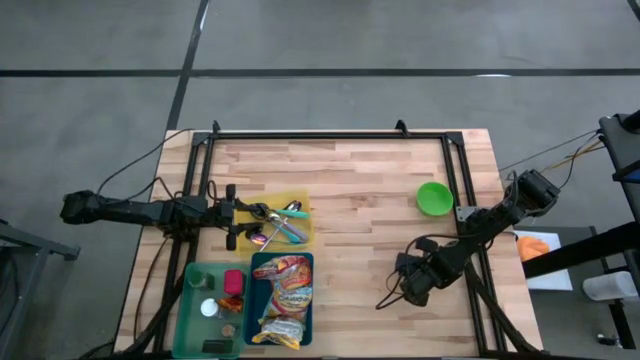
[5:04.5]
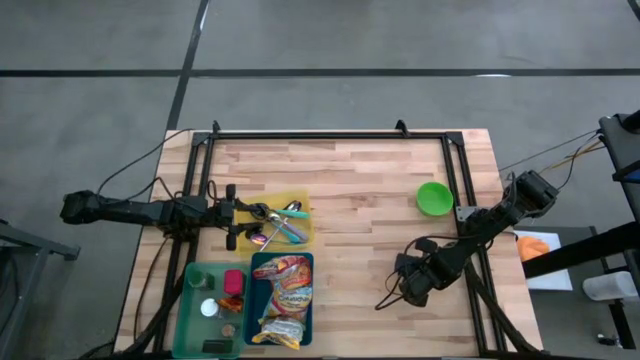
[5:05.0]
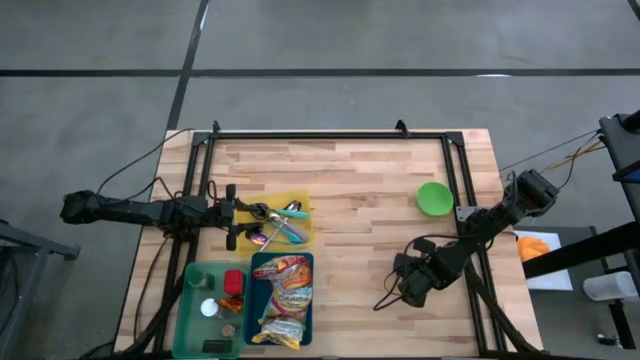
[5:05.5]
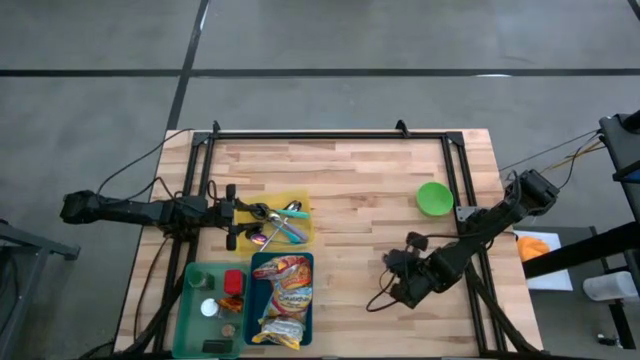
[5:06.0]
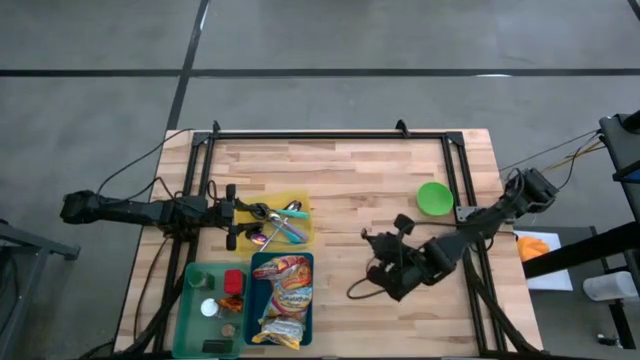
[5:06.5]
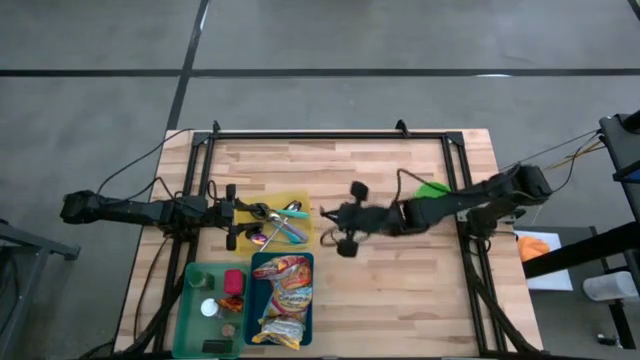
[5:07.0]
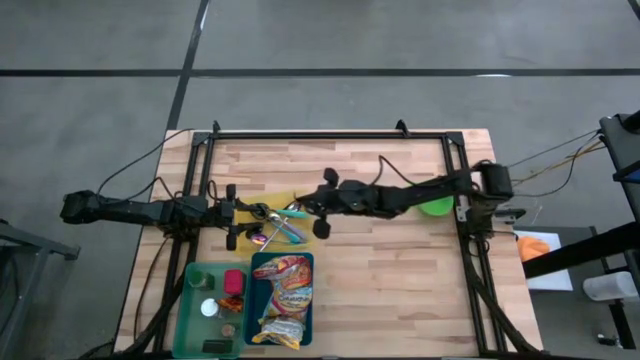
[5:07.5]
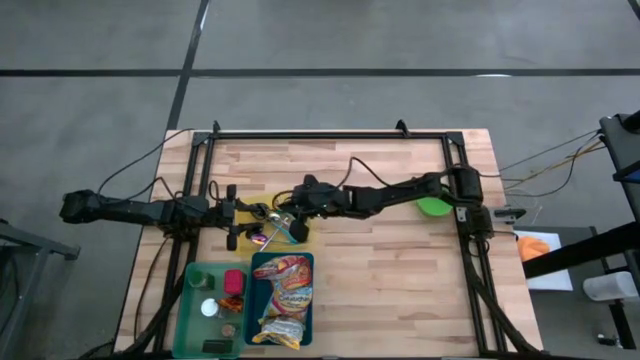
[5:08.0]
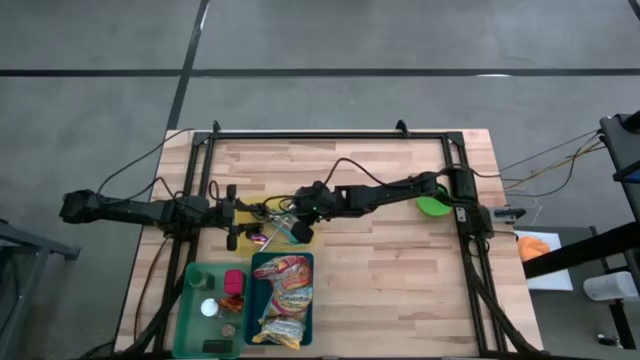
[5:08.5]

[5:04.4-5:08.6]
Put the light blue spoon into the yellow bin

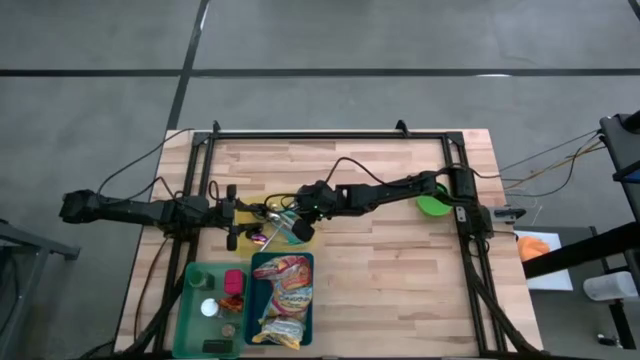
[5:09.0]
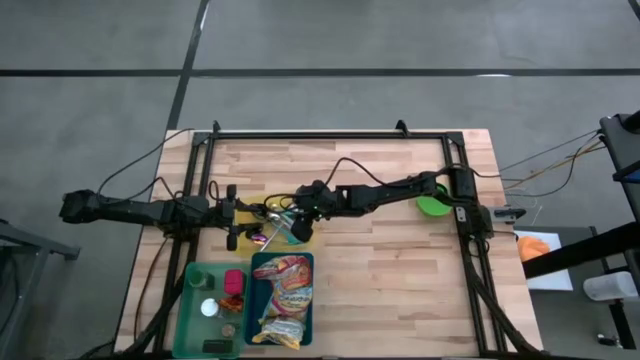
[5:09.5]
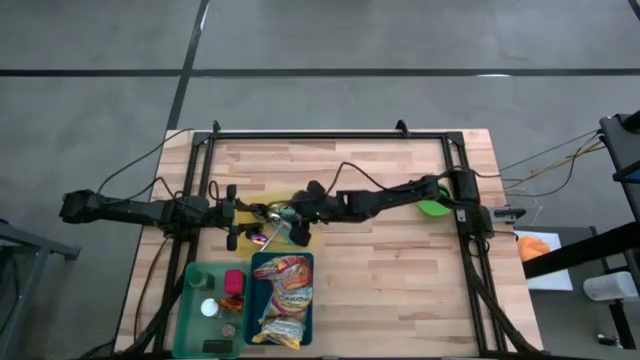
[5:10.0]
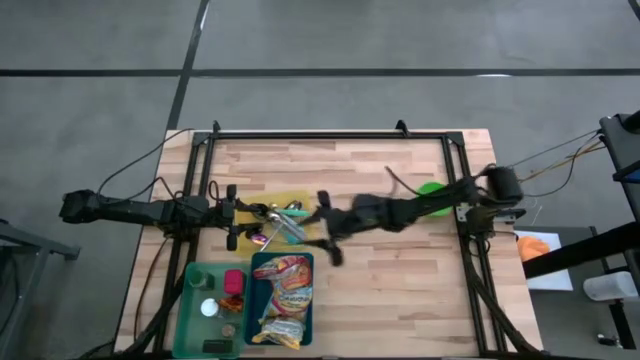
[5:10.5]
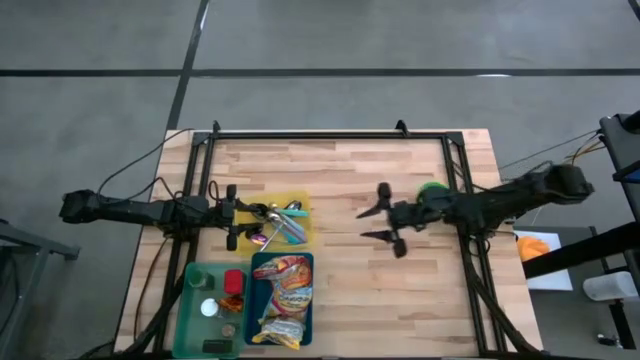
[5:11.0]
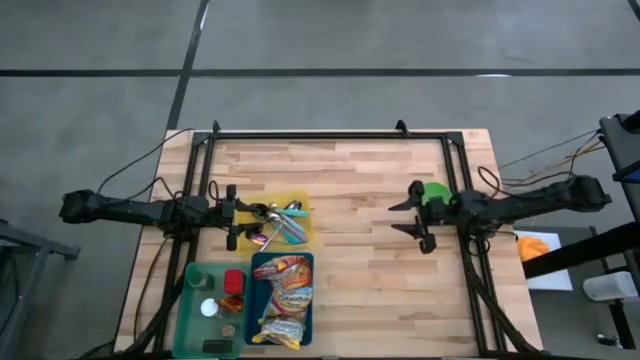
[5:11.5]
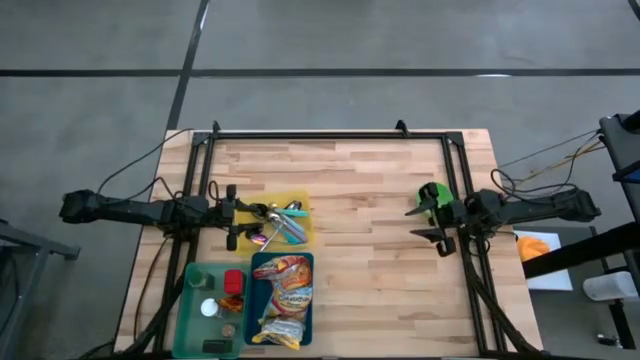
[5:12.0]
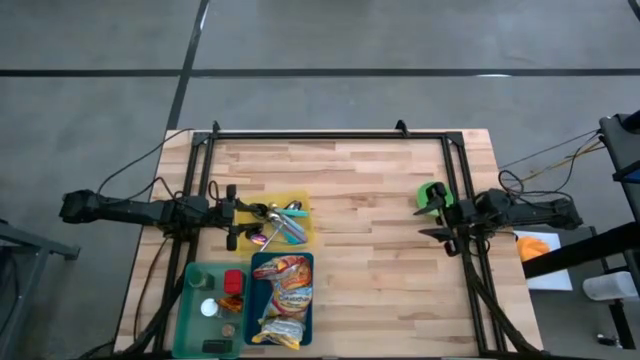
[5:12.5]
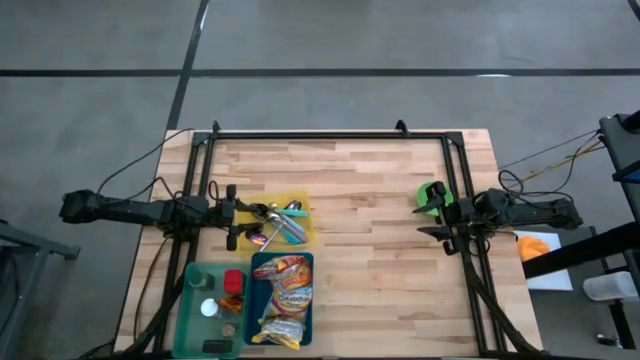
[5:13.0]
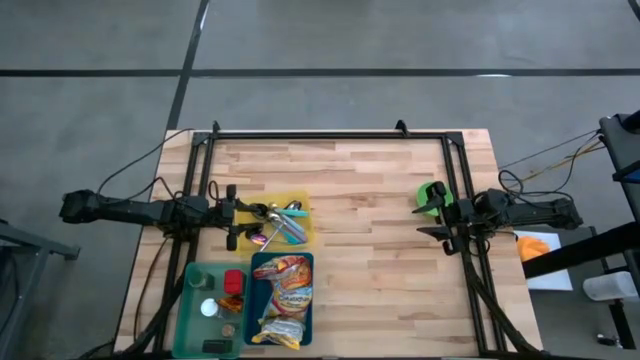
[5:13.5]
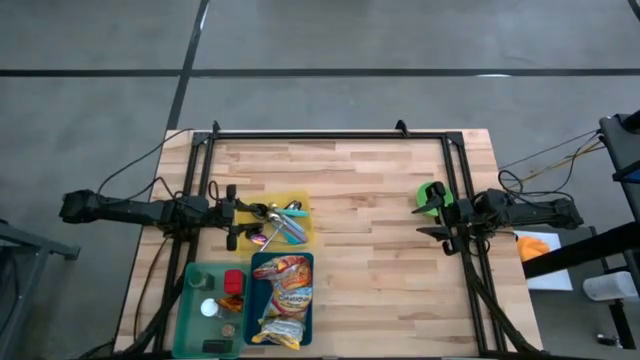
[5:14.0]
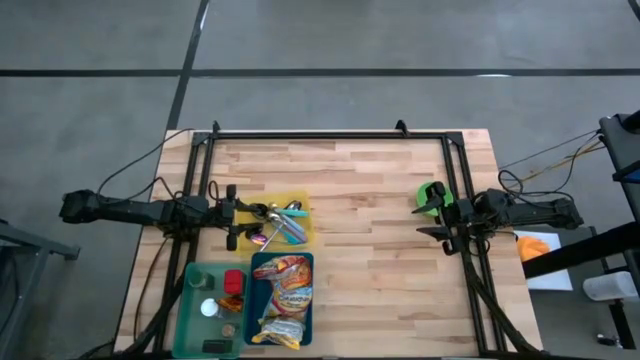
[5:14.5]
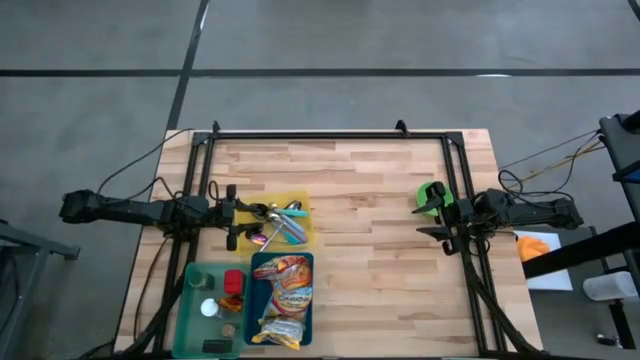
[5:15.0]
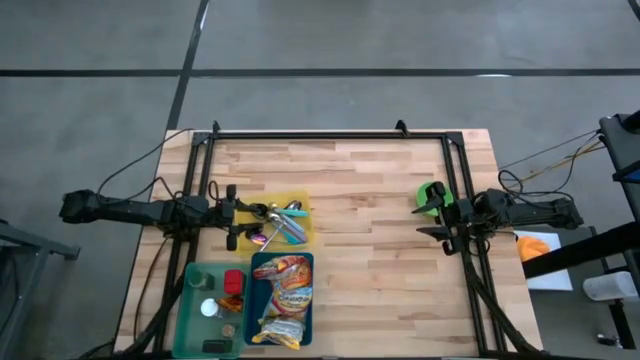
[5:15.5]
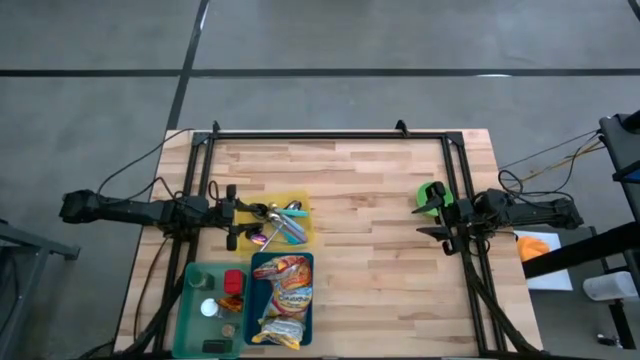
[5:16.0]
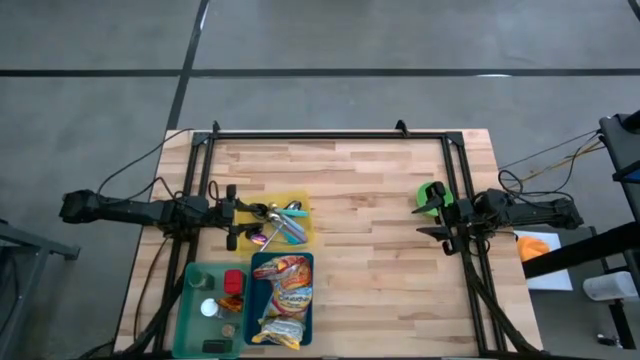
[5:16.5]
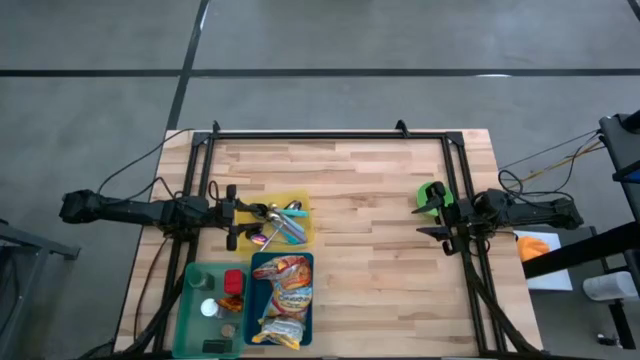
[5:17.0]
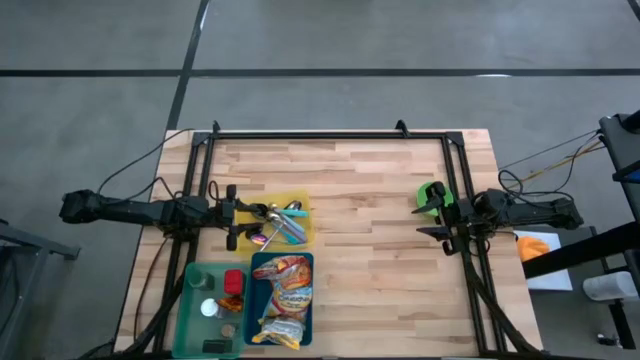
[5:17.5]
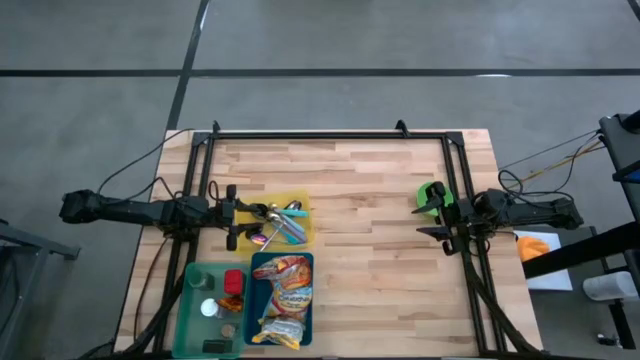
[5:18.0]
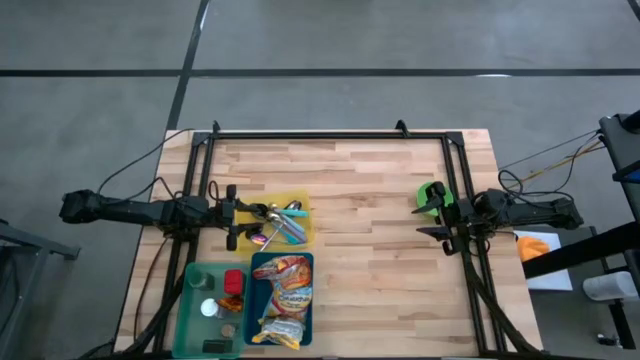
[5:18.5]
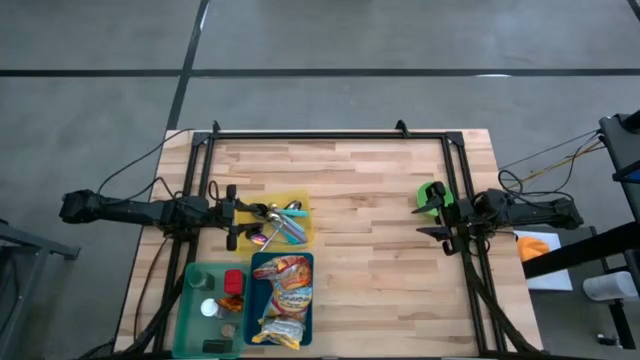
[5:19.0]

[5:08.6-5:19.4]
Return to Home Position

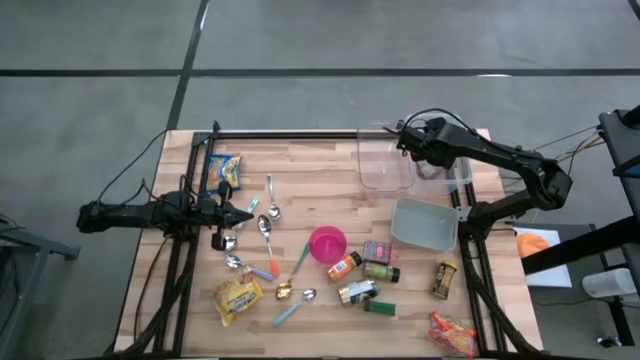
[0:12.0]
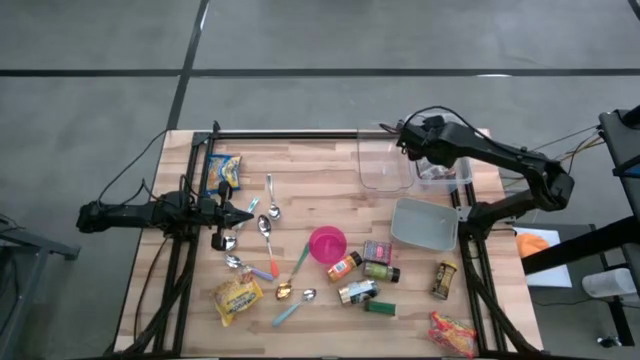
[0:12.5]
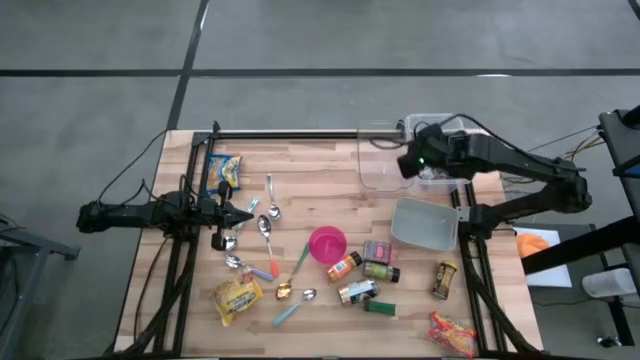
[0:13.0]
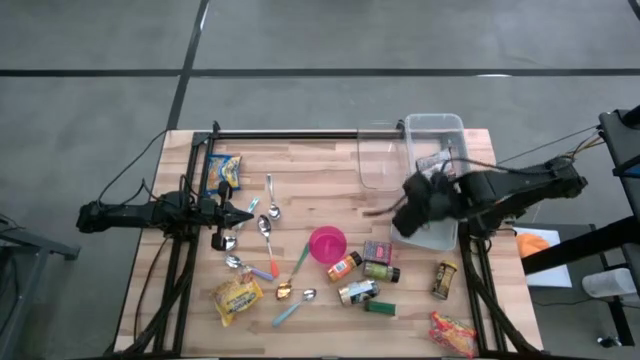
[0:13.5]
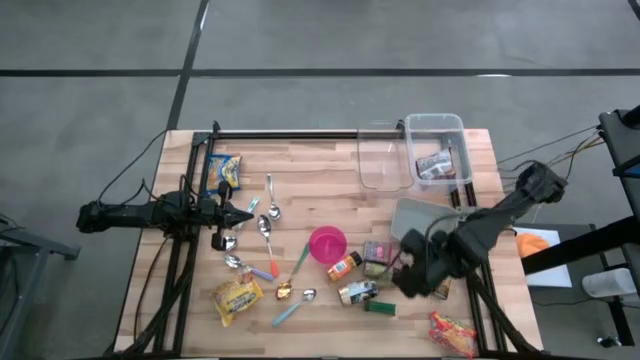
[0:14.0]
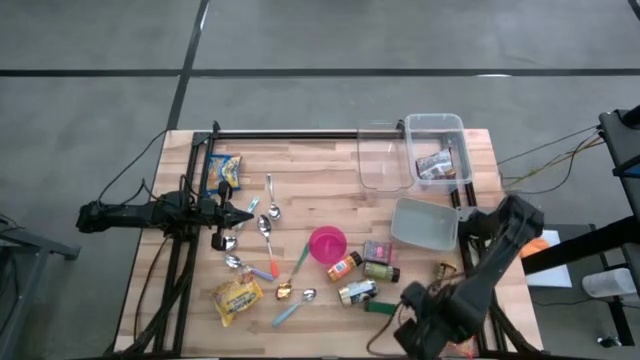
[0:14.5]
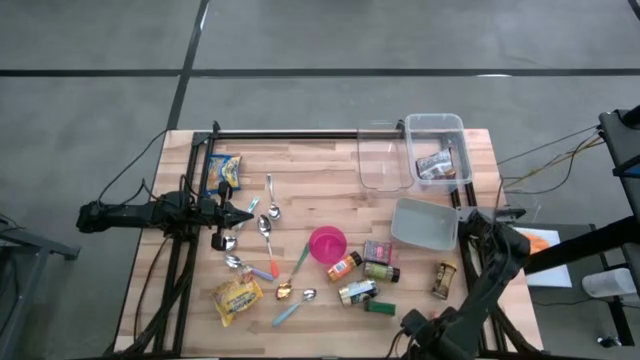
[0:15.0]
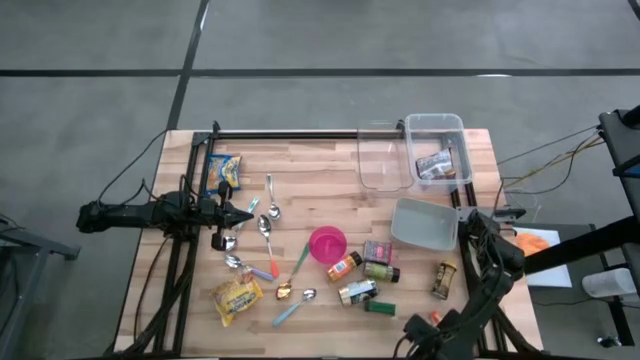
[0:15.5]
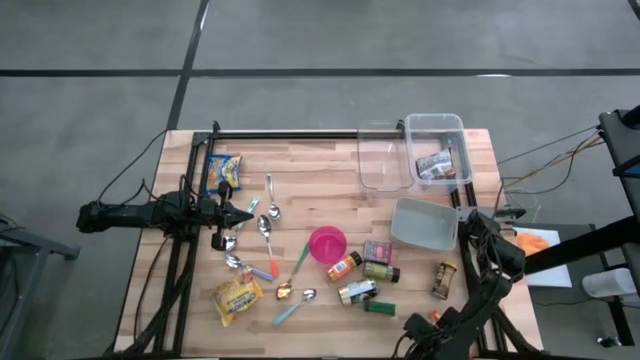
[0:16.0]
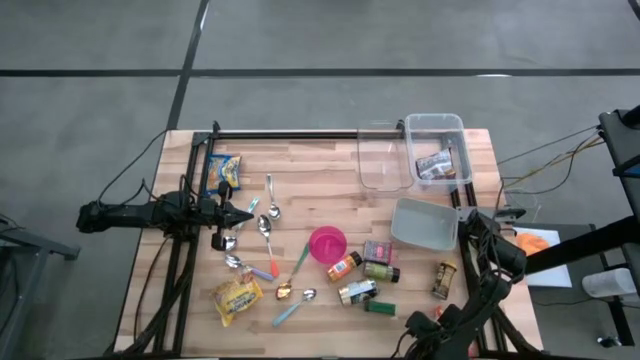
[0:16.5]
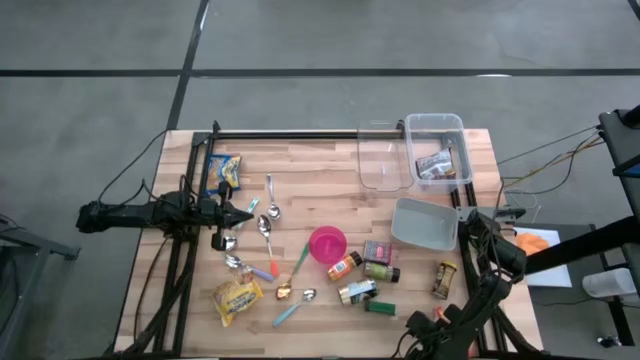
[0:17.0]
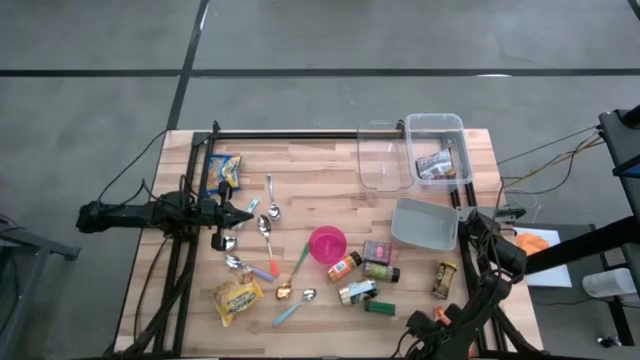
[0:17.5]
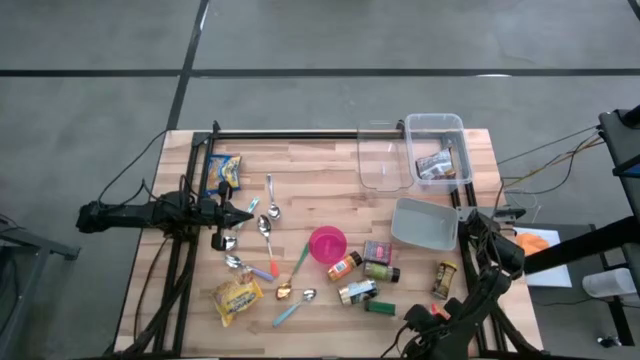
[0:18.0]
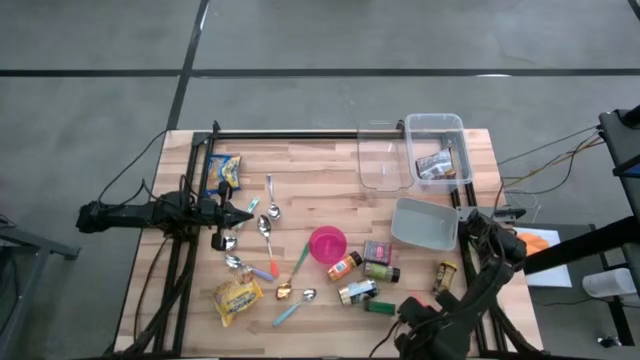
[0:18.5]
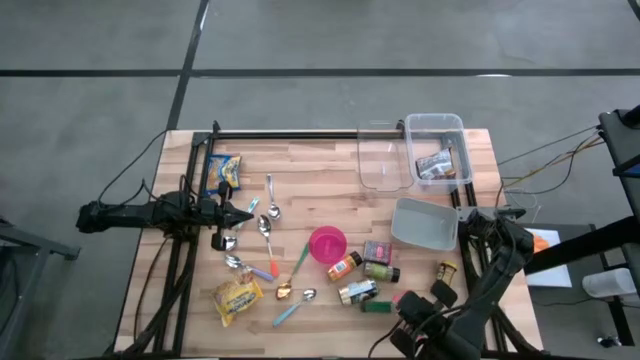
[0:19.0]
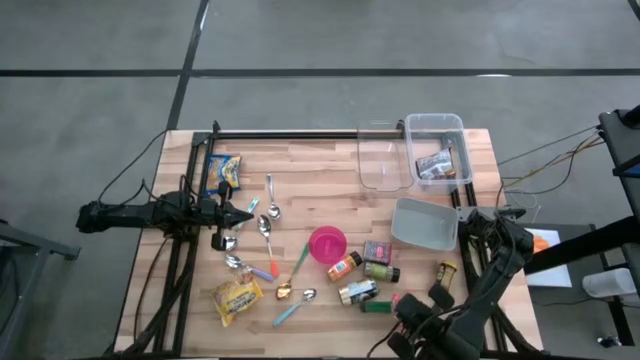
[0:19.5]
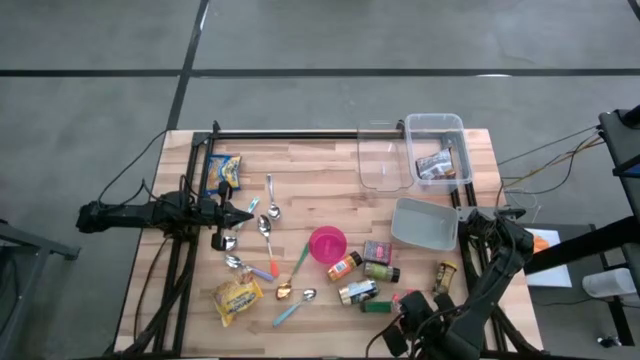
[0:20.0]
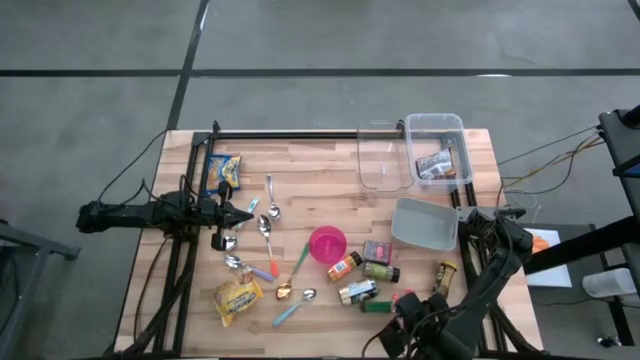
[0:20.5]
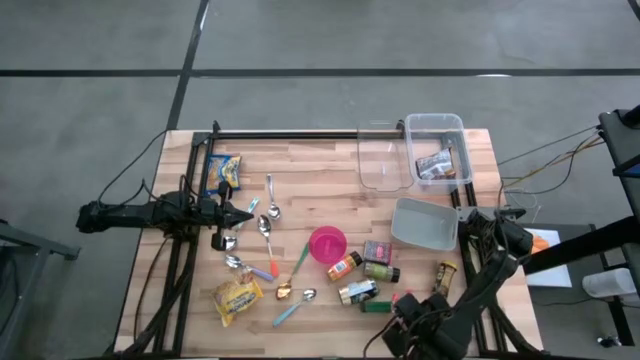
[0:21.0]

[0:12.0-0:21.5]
Put the orange noodle pack into the white bin
